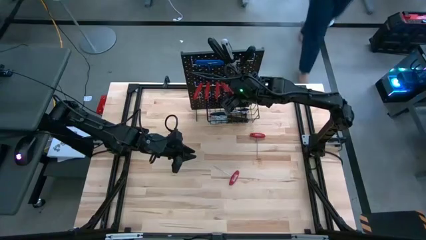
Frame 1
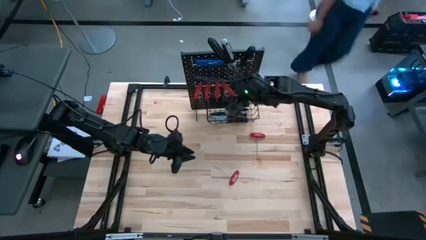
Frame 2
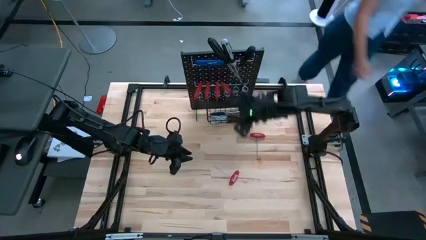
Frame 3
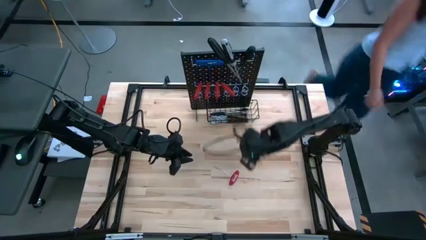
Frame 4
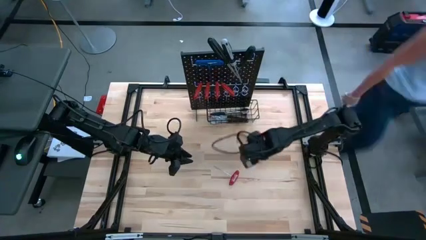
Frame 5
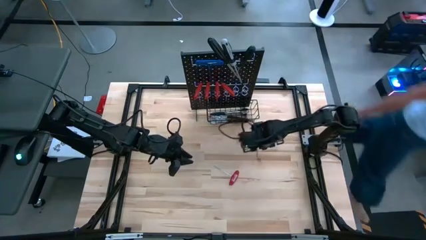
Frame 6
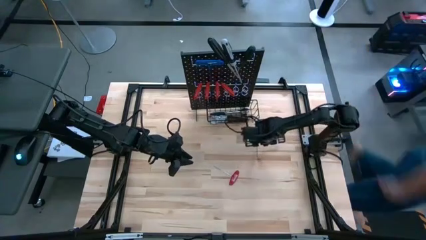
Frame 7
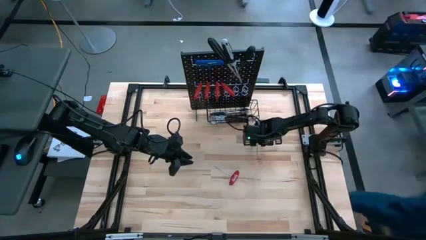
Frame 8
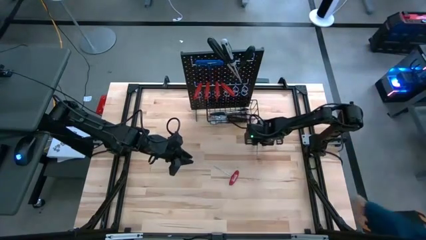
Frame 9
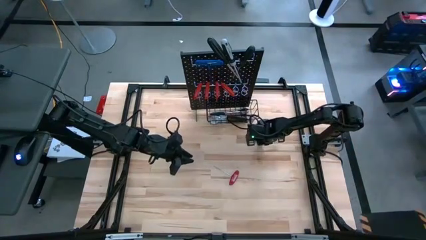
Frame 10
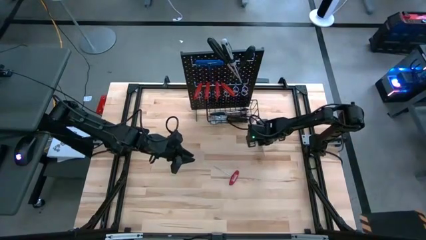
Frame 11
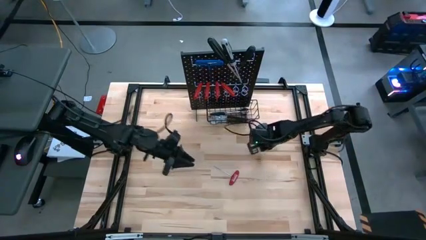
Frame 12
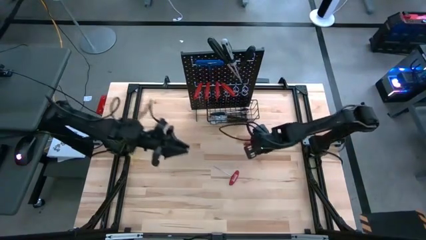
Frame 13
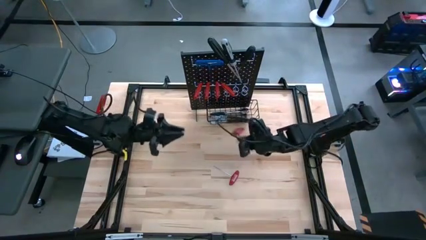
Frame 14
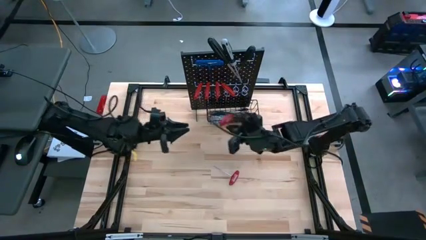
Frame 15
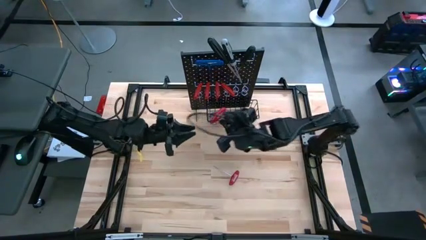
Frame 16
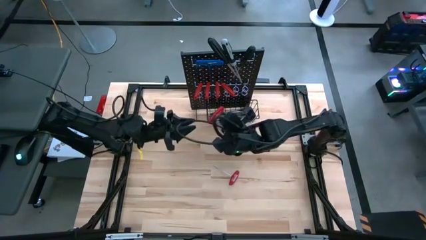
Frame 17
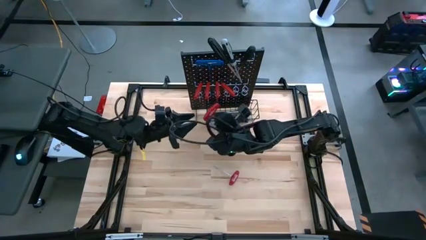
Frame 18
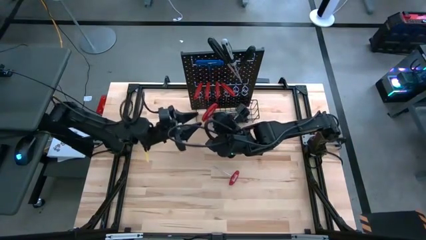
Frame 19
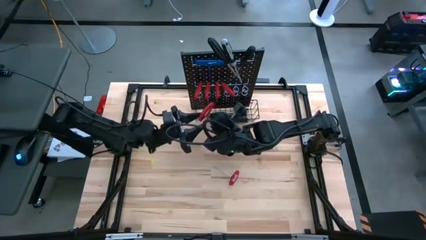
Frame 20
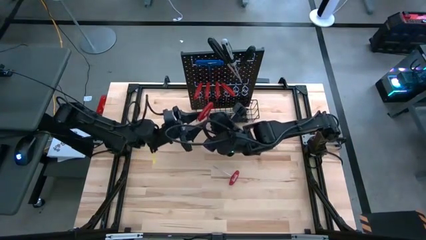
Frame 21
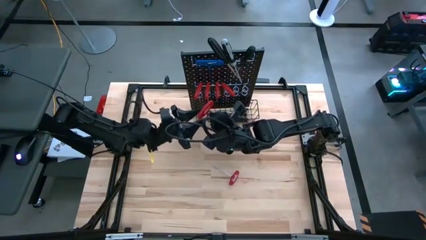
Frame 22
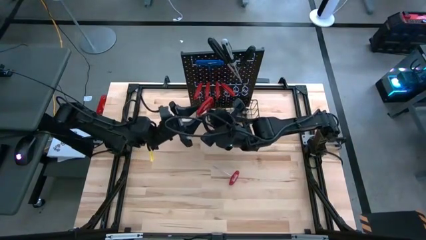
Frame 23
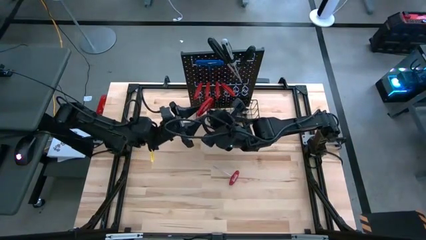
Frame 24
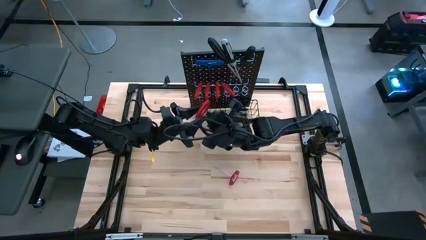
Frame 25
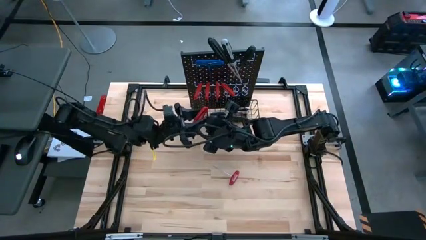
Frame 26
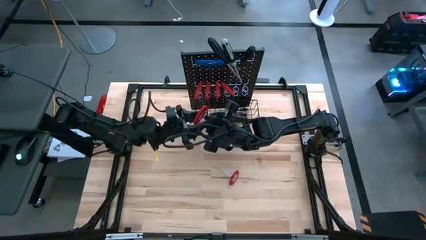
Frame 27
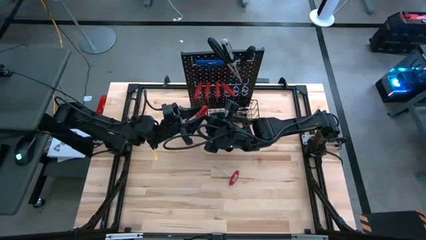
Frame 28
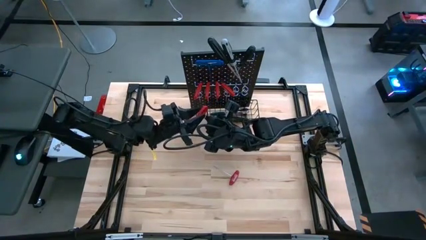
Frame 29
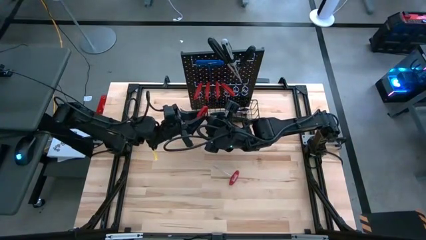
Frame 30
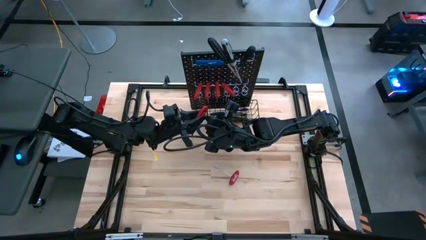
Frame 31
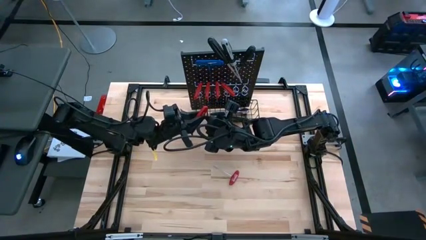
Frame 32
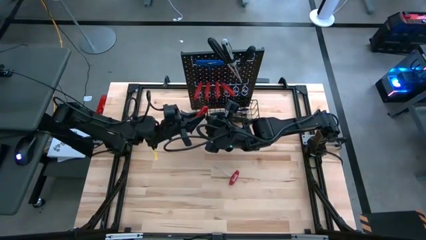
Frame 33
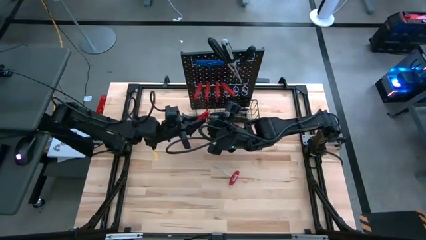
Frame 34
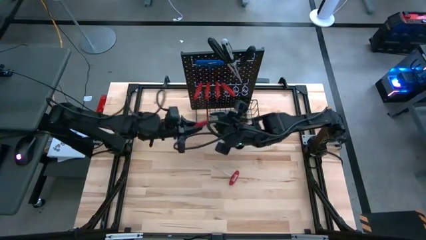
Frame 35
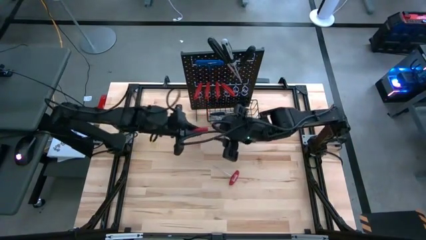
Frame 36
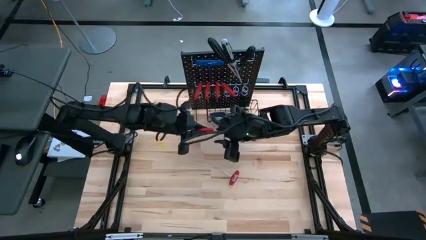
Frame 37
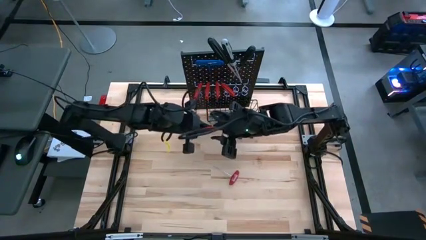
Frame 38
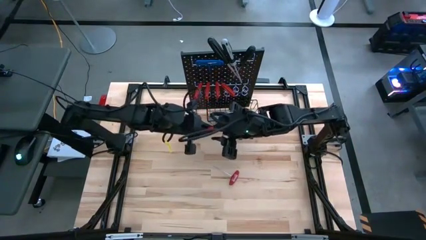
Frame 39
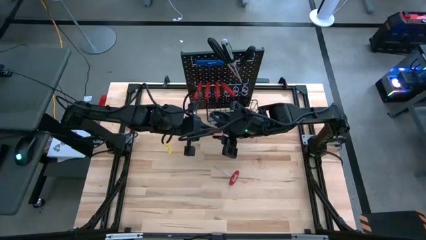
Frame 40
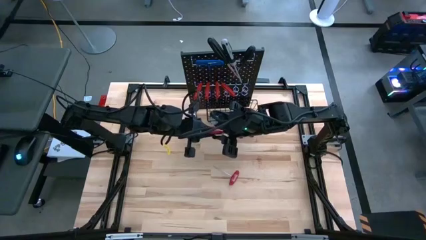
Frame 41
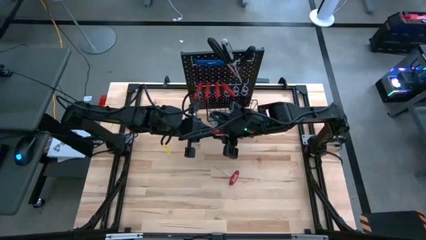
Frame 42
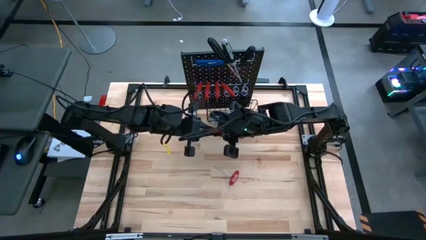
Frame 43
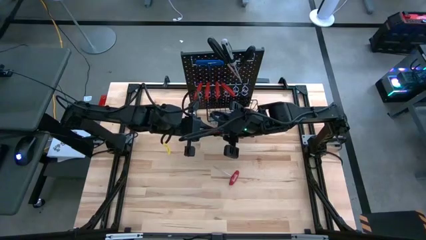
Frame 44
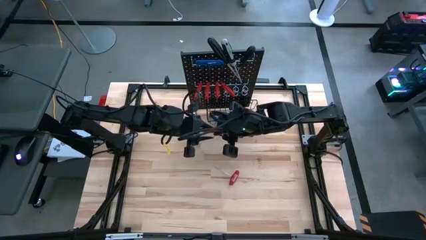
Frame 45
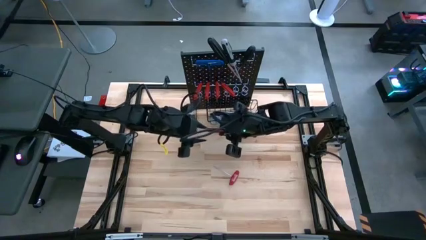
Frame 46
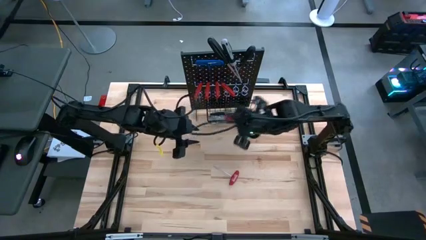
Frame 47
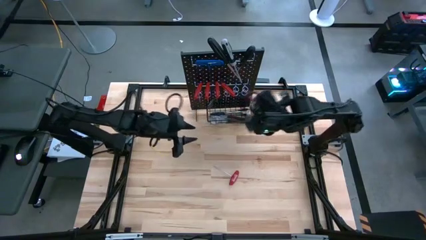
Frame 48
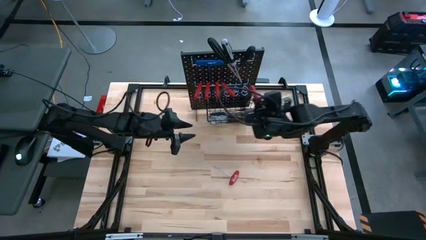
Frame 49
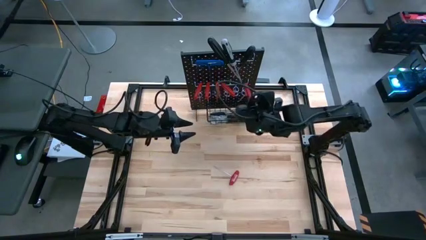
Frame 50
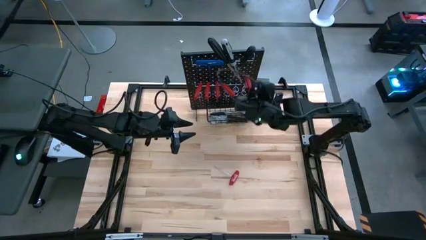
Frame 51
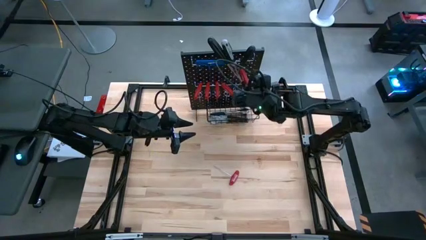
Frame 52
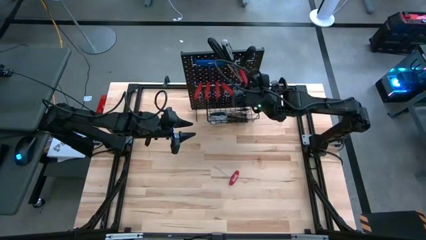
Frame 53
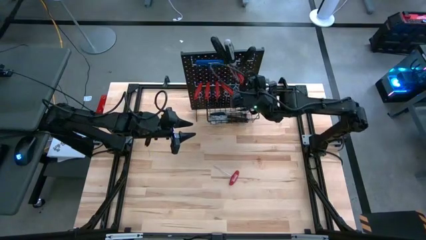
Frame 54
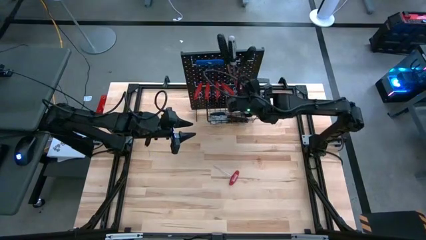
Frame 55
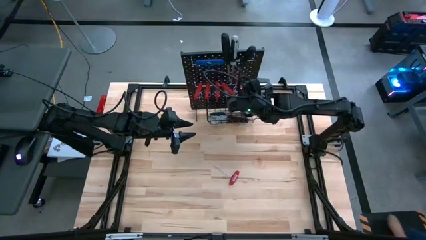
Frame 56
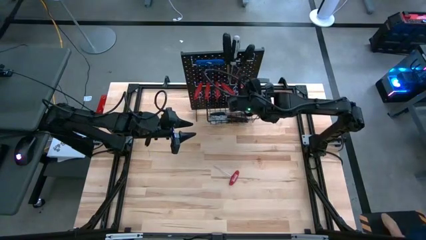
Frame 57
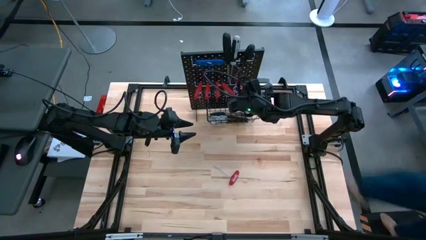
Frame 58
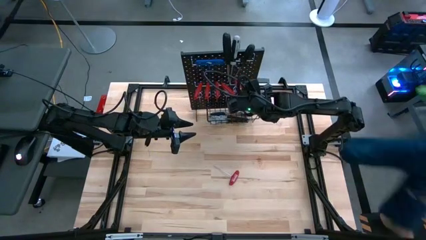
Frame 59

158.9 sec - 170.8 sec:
Task: Hang tools onto peg board
Hang the red allen wrench on the pegboard
